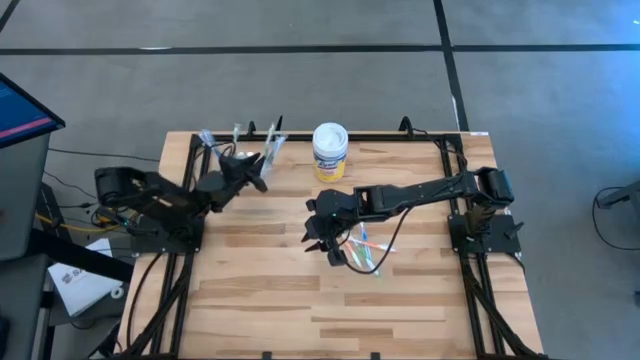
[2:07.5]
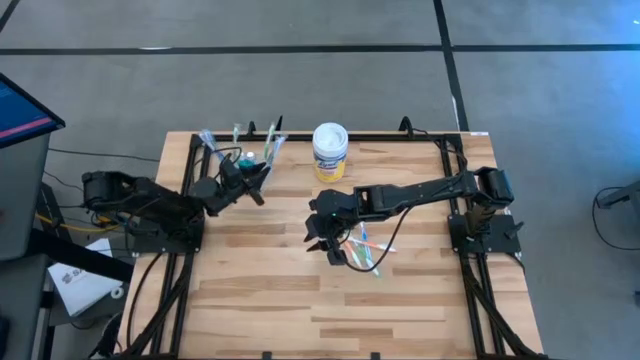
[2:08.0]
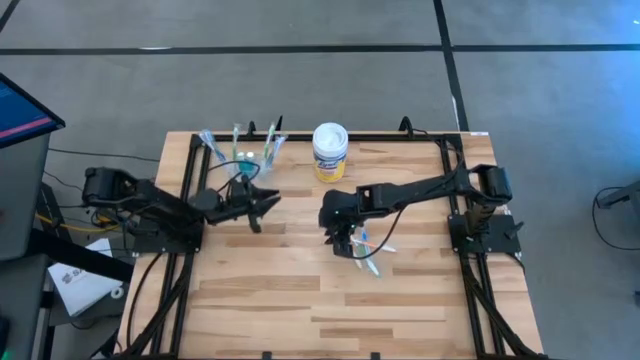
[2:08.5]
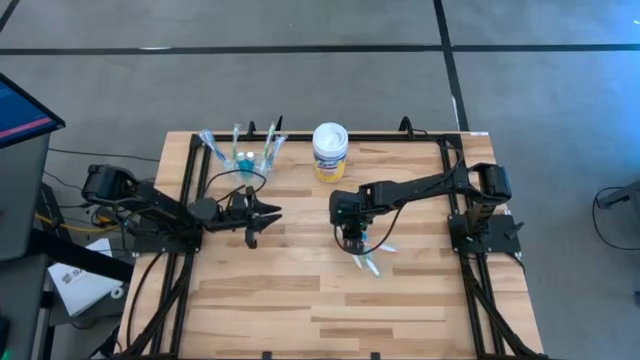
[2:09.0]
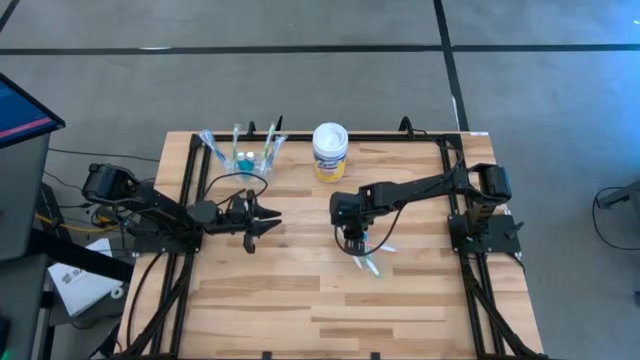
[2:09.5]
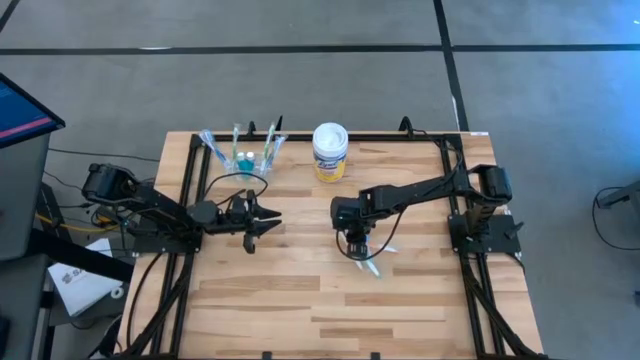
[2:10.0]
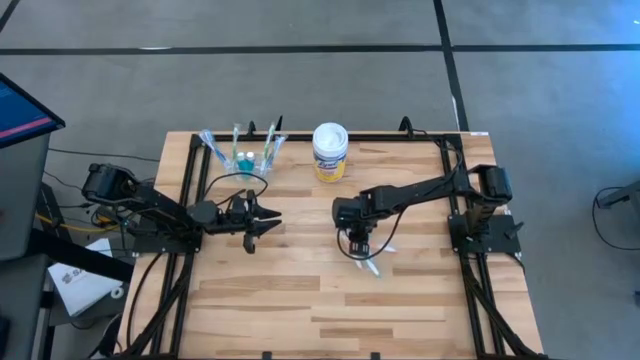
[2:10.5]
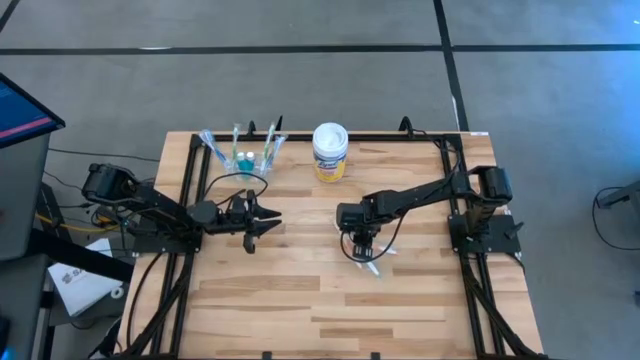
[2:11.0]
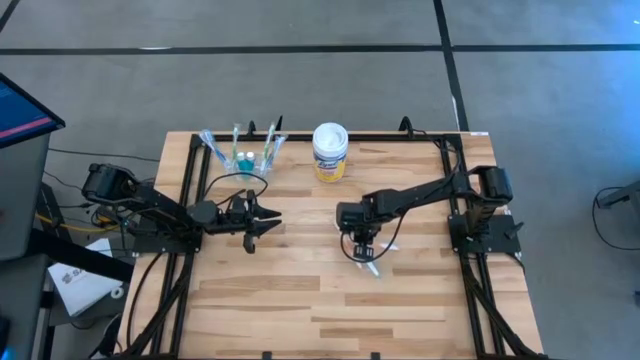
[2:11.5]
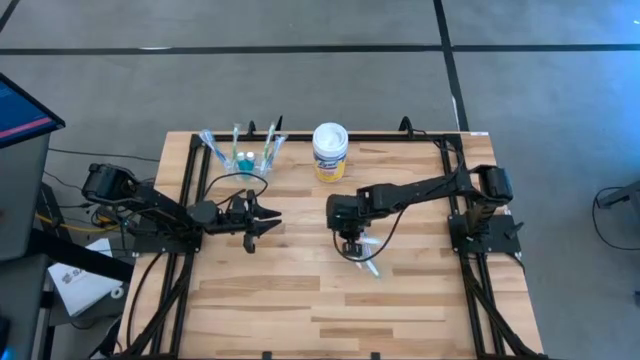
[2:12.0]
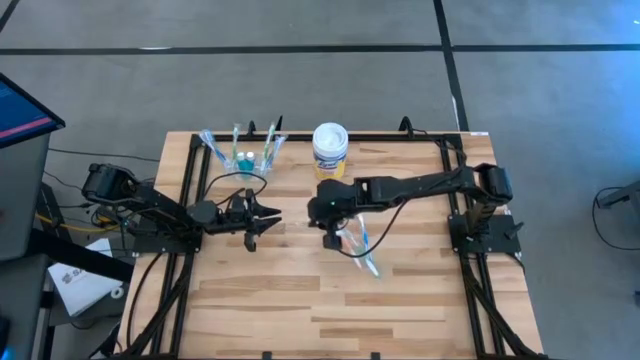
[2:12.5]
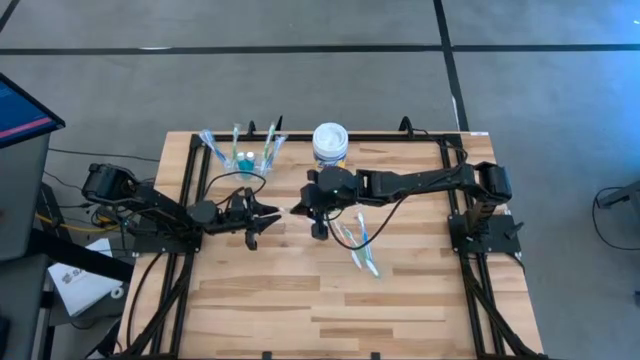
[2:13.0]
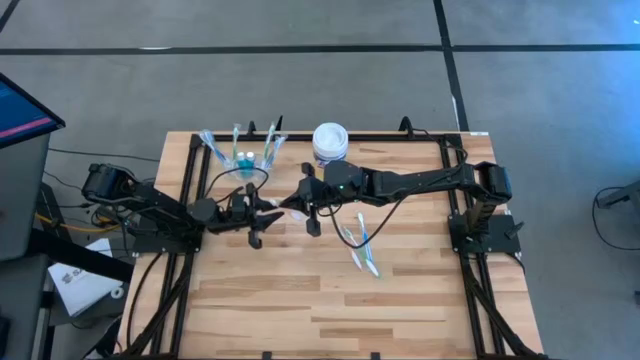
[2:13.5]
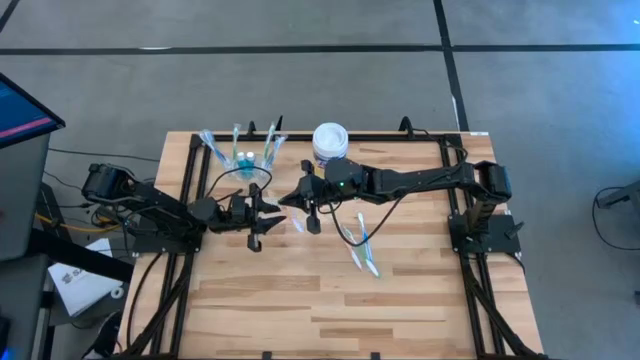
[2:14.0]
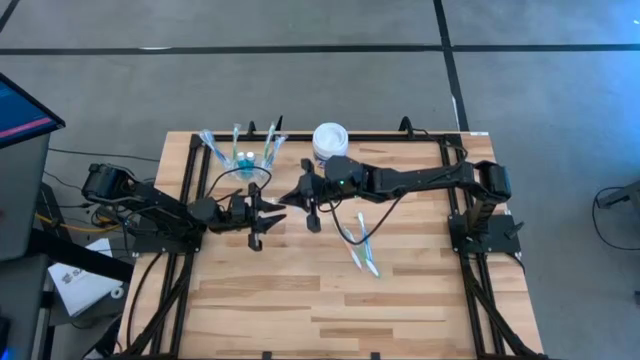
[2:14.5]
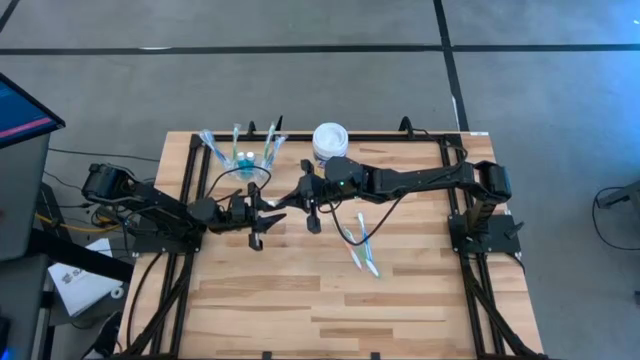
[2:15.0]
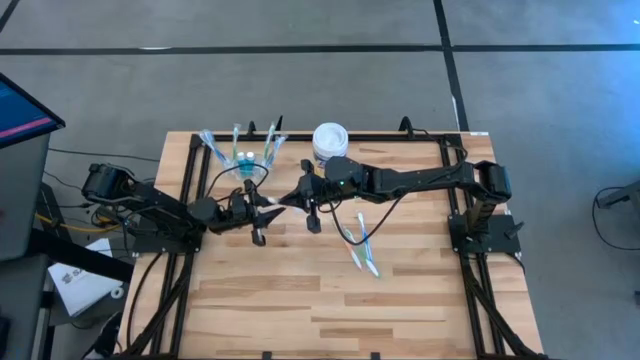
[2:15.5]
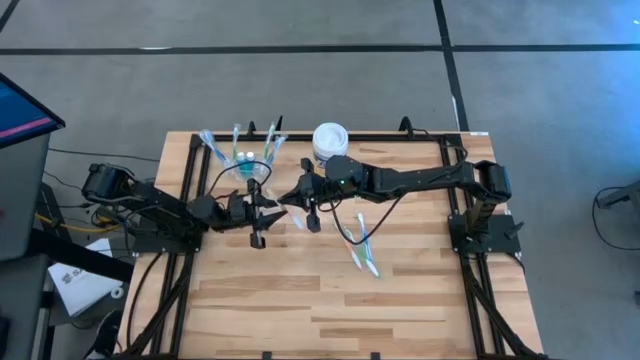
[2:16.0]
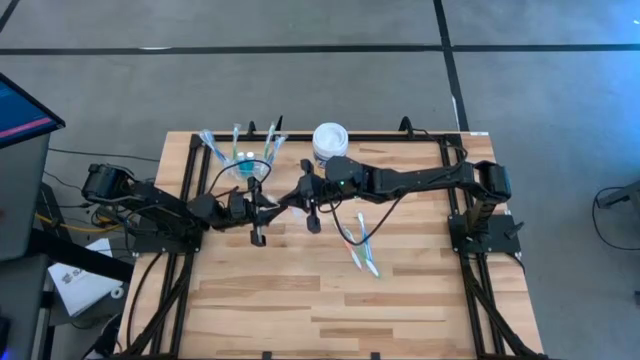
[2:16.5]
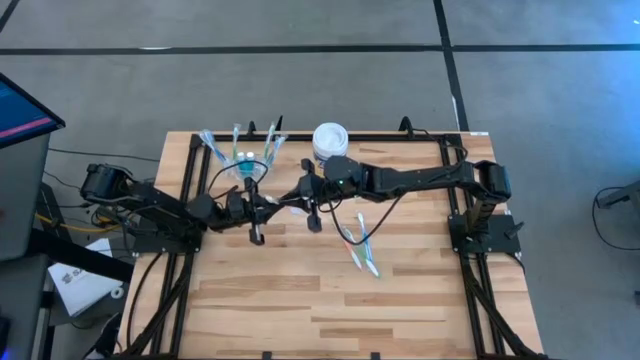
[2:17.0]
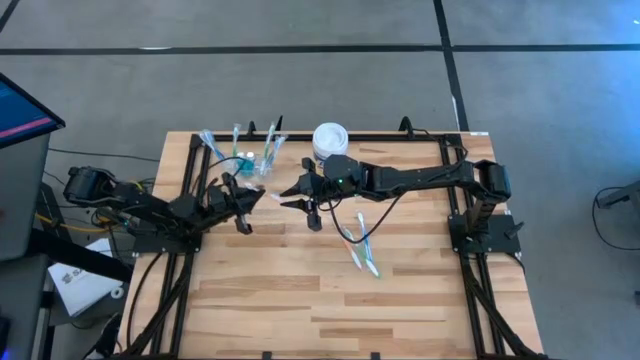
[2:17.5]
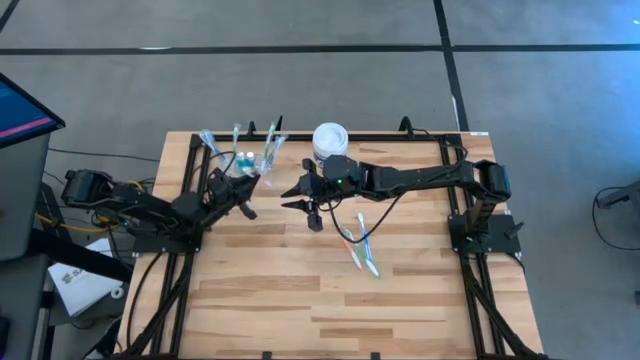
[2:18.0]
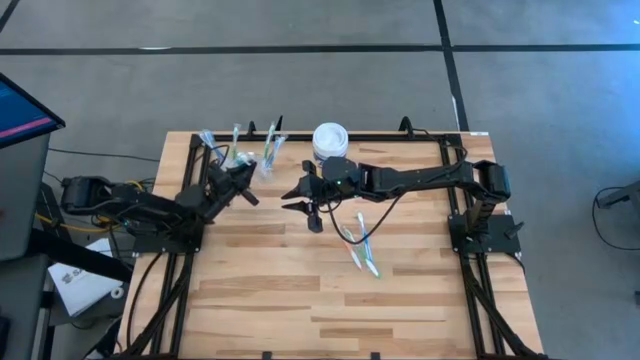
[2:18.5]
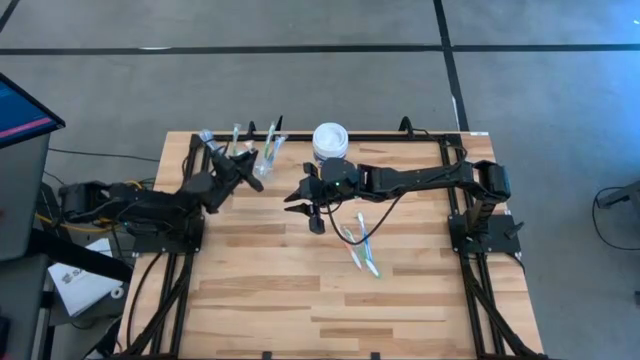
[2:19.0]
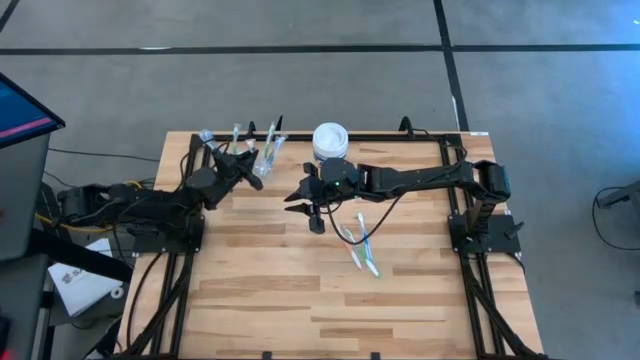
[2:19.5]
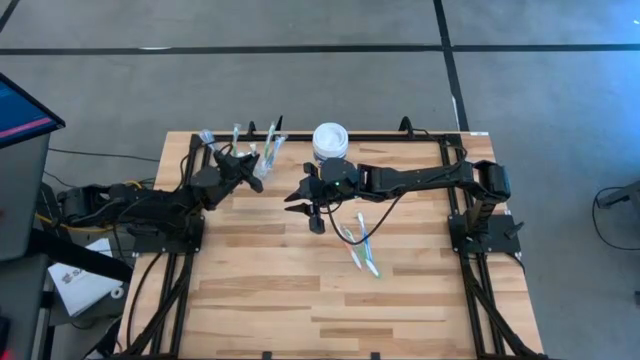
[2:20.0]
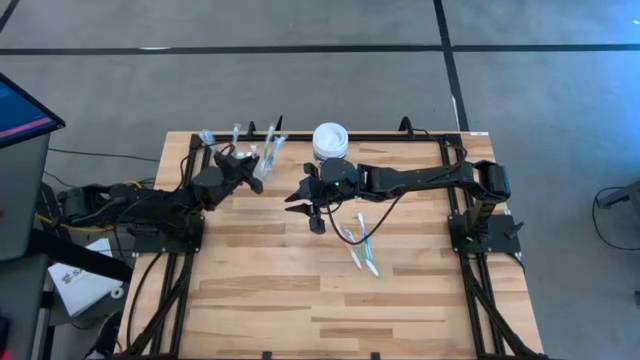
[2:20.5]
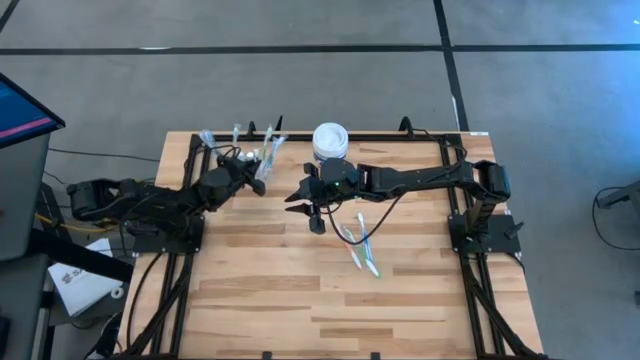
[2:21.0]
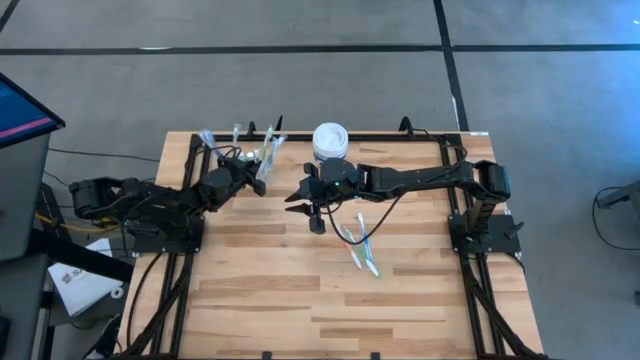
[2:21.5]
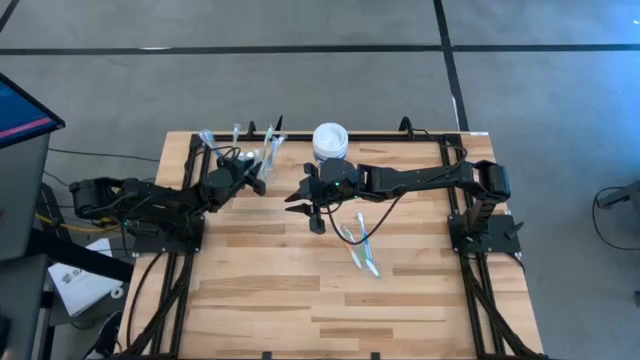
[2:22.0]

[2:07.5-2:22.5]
Task: Pick & Place toothbrushing station
Put the orange toothbrush into the transparent organizer

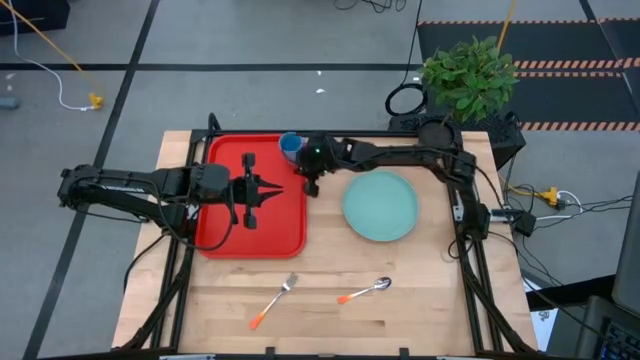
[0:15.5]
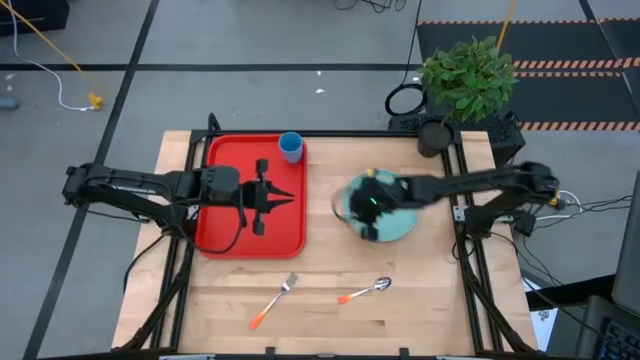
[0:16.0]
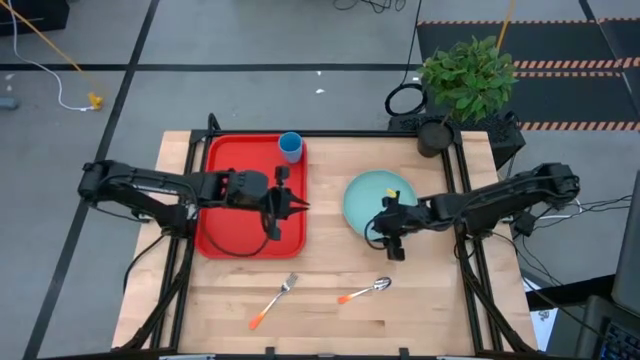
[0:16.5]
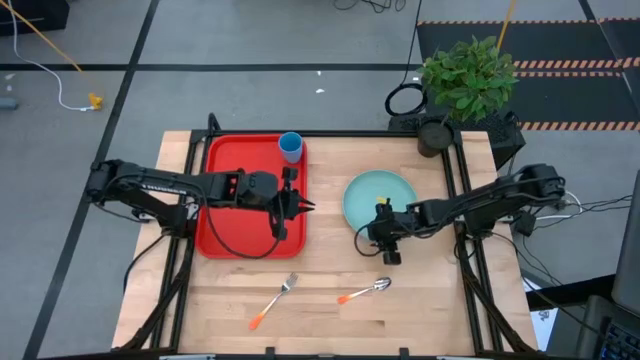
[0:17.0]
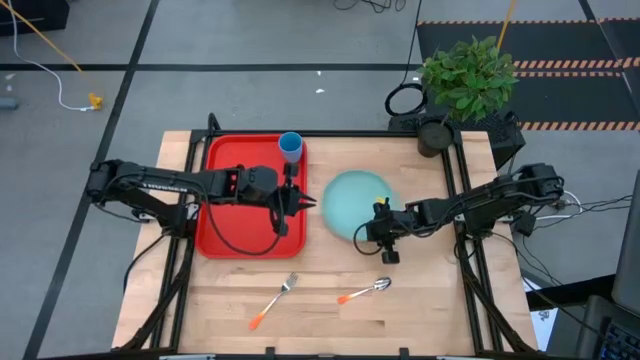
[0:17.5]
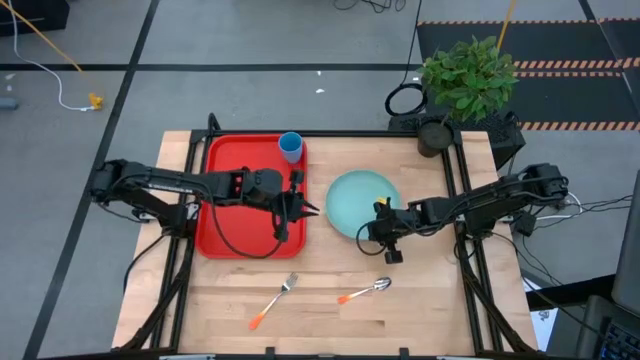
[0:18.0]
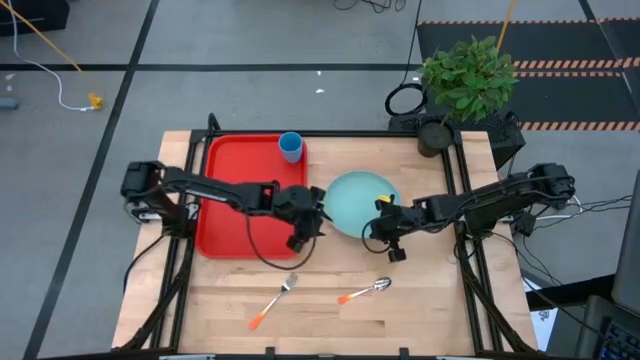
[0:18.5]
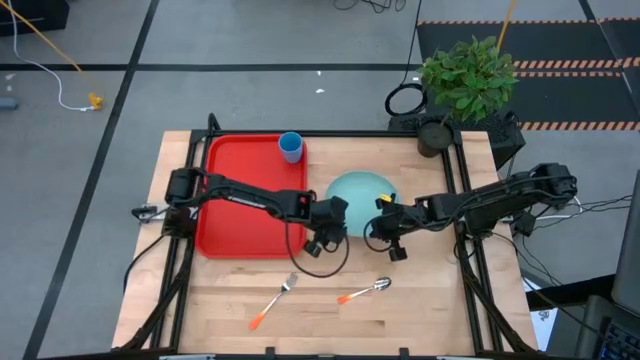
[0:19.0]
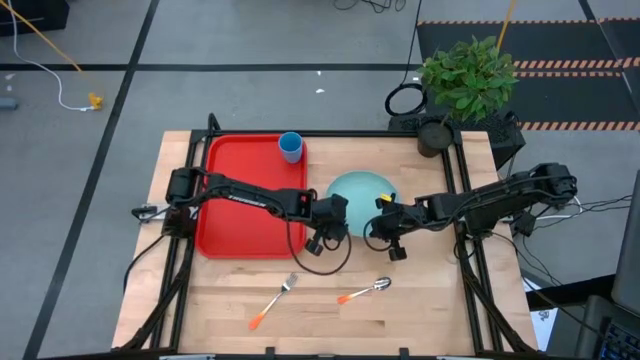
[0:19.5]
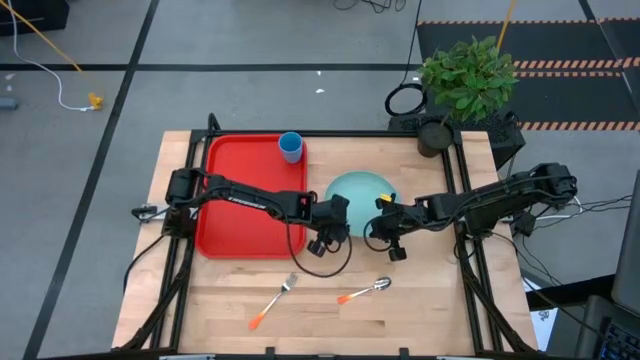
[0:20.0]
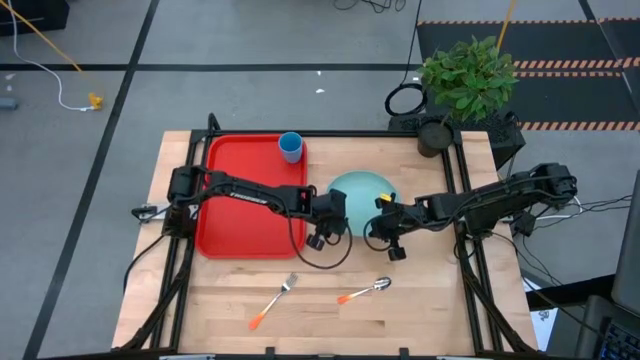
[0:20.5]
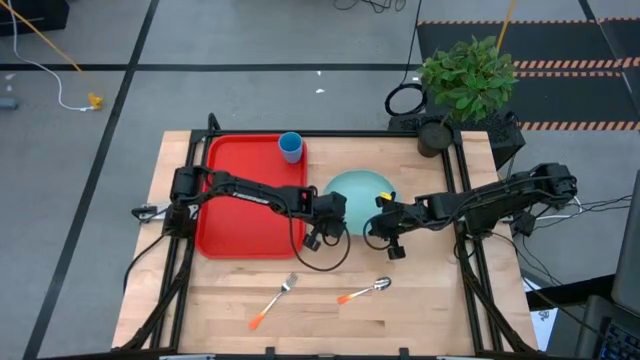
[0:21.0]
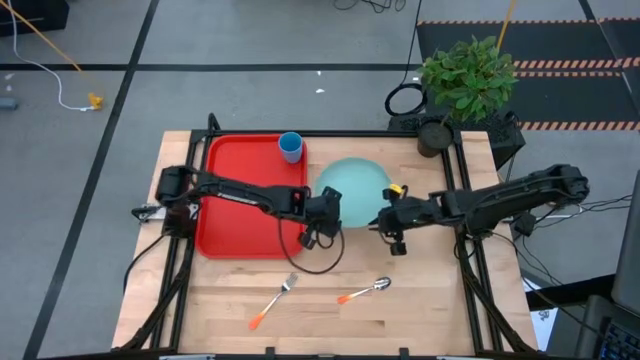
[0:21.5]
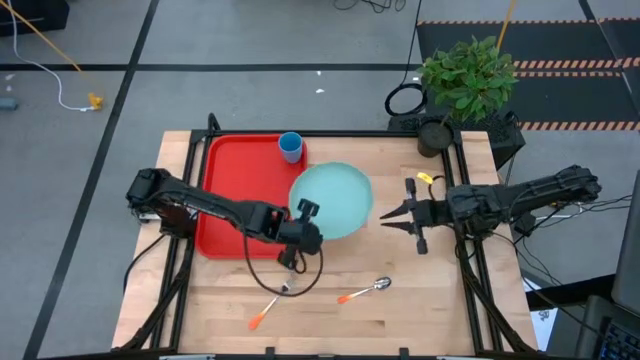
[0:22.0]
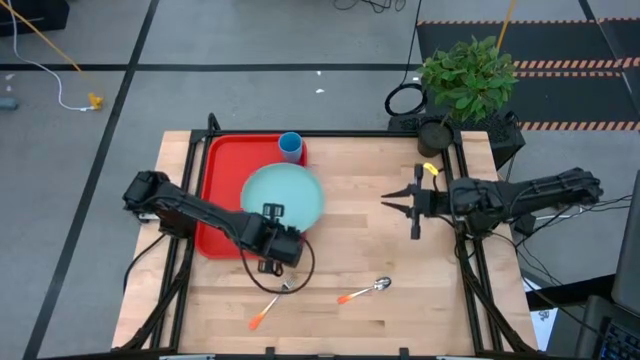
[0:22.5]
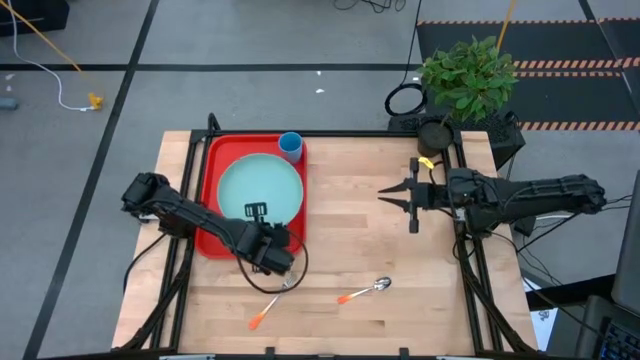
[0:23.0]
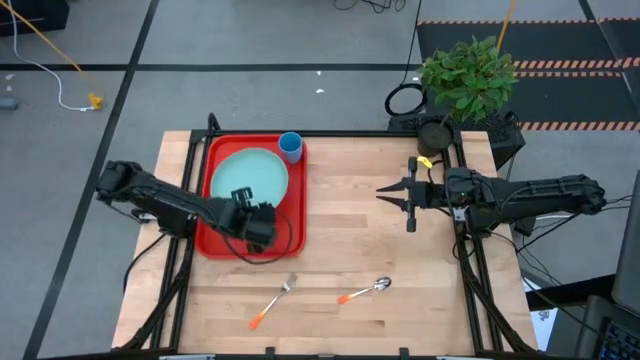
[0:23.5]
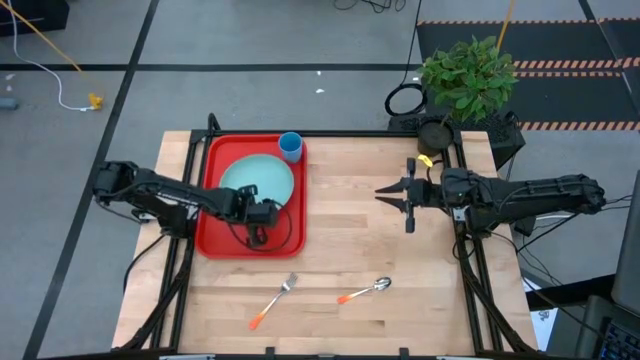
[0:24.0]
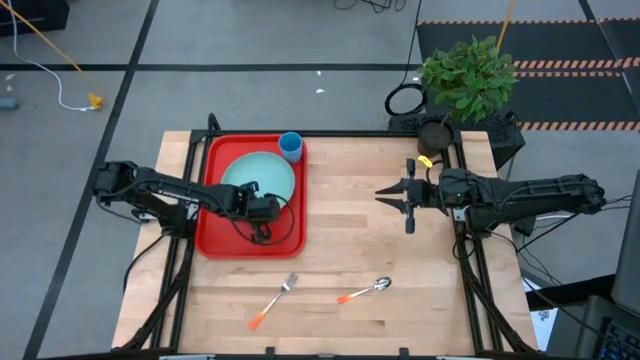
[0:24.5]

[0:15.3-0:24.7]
Task: Pick and place plate/cup/fork/spoon on tray
Put the light green plate on the red serving tray to the bottom right of the blue cup
